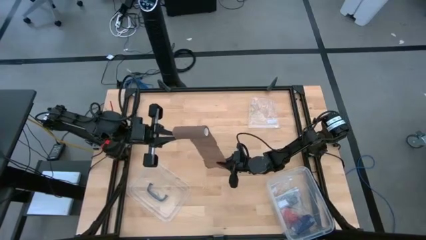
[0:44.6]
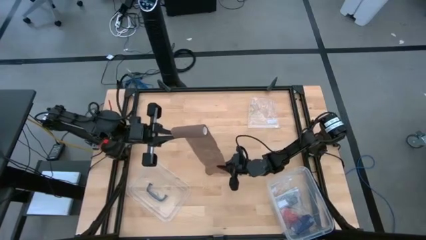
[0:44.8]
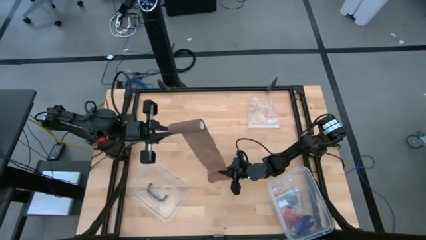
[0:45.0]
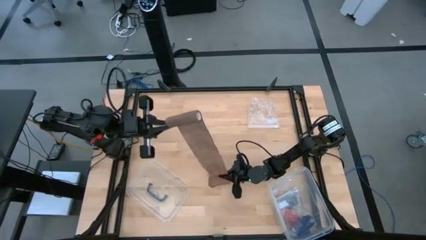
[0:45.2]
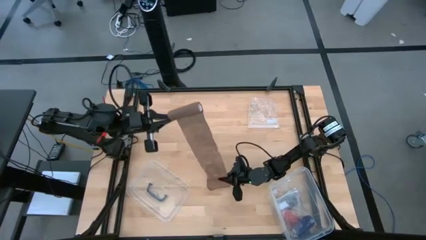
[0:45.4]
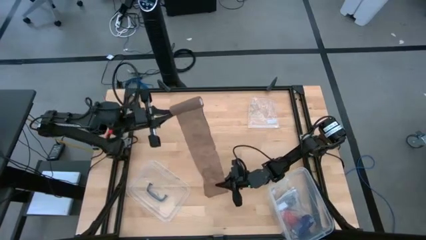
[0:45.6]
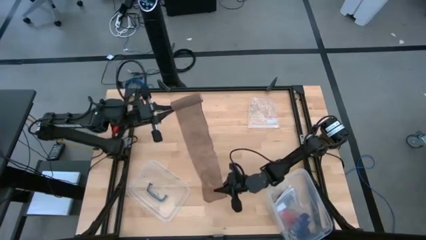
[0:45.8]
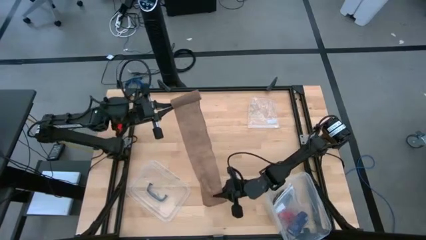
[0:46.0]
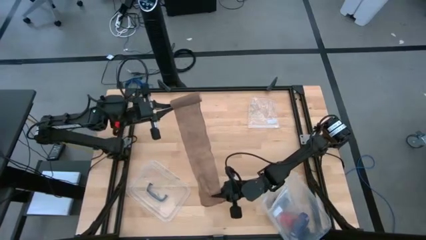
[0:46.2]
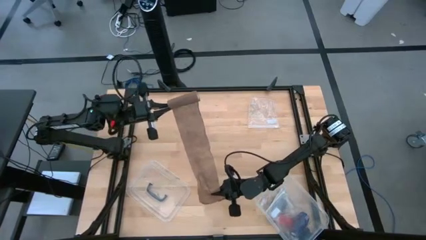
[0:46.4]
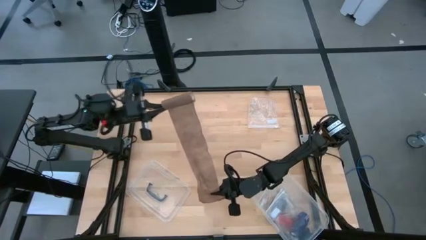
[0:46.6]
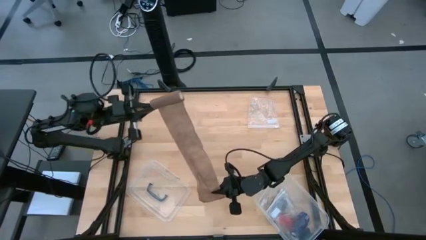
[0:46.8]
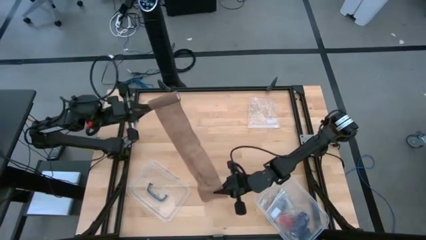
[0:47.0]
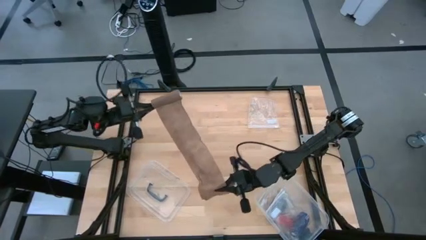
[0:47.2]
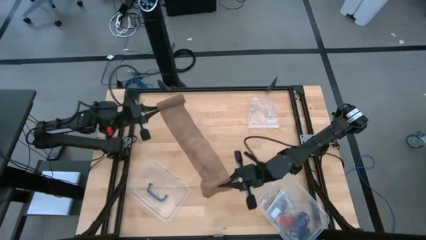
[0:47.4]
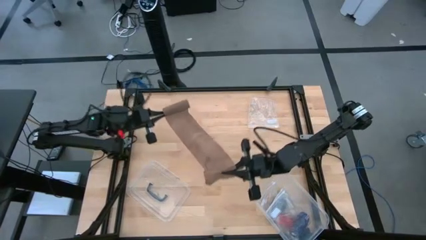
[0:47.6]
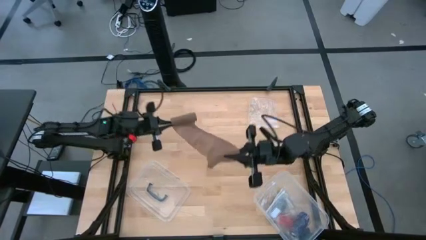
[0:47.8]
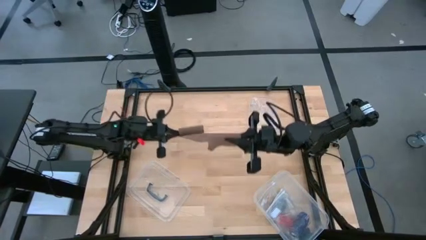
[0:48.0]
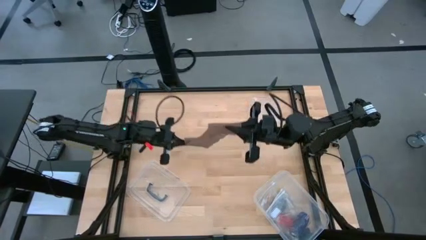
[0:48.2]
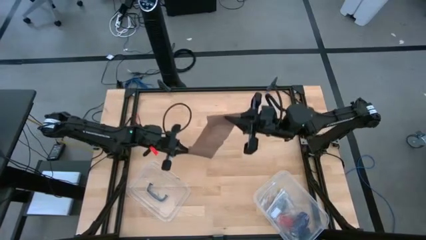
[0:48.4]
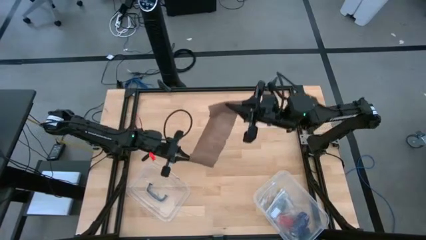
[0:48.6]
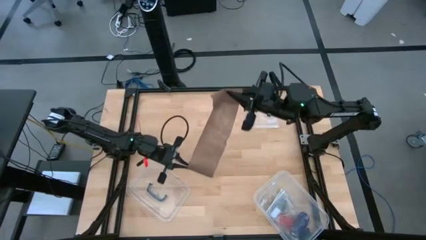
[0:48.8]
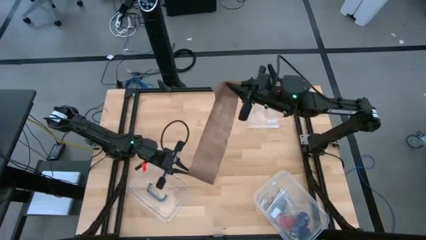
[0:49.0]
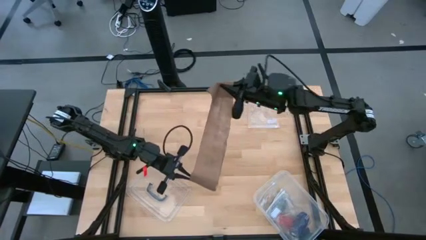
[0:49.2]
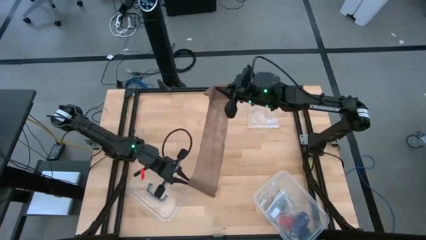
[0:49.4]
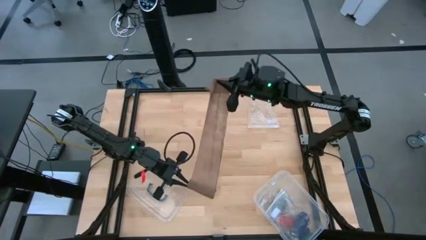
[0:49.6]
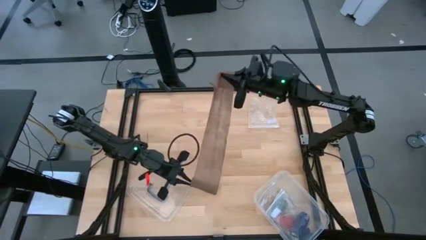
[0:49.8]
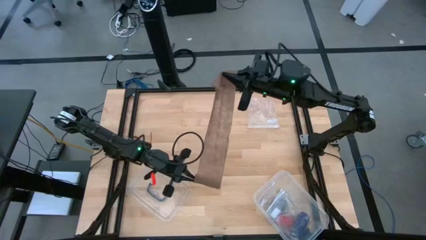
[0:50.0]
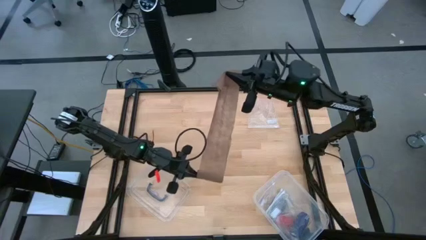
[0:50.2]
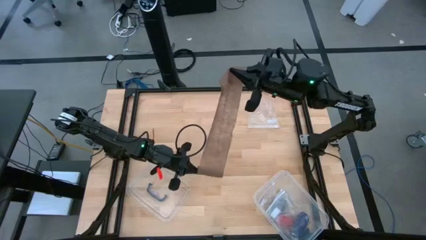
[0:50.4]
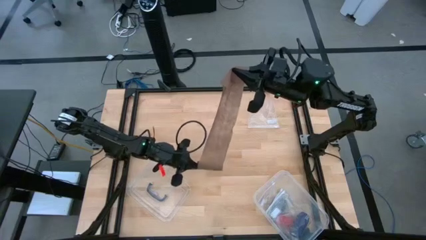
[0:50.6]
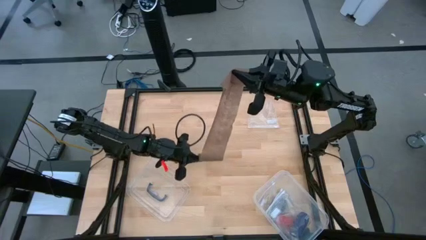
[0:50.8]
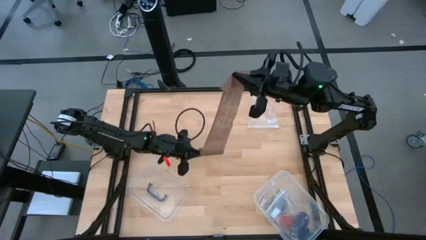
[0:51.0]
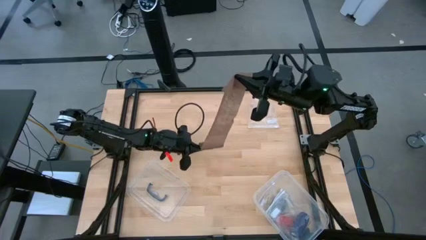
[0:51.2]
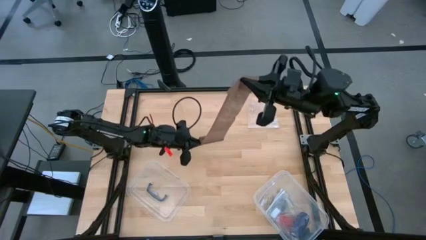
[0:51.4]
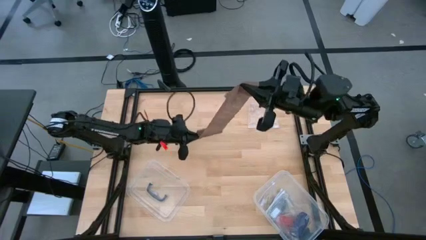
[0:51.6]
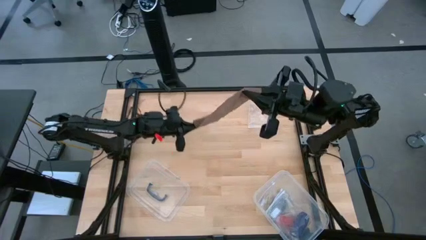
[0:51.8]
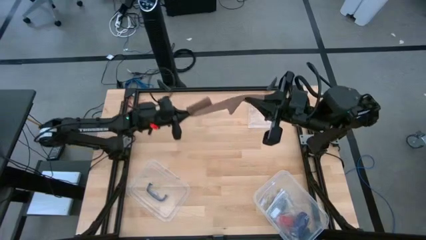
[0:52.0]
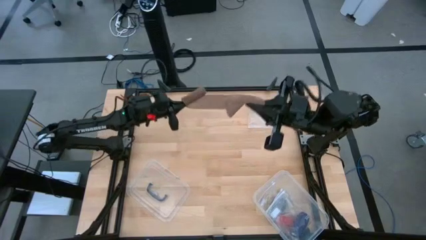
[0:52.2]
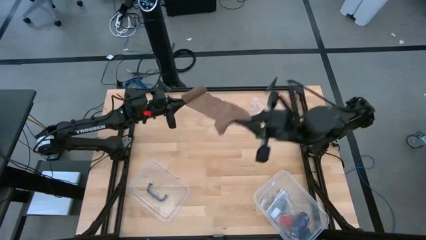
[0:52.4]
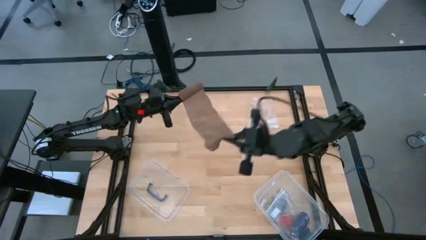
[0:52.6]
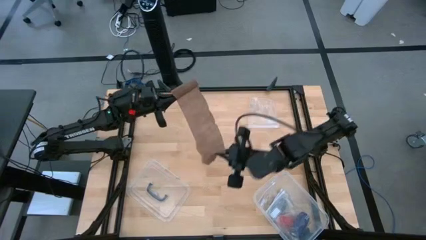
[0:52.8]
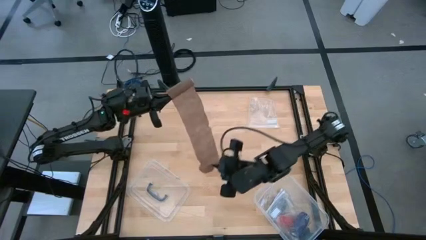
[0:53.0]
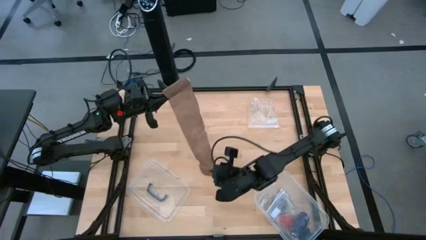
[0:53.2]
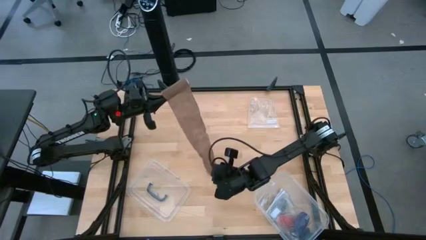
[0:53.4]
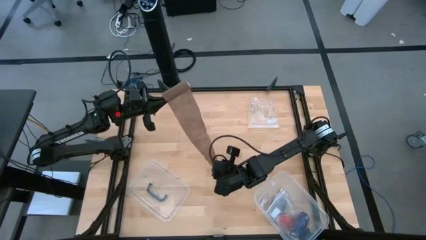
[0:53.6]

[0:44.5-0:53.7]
Task: Roll bandage
Roll the brown bandage

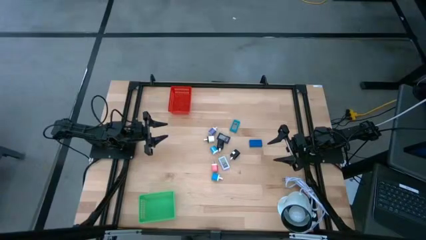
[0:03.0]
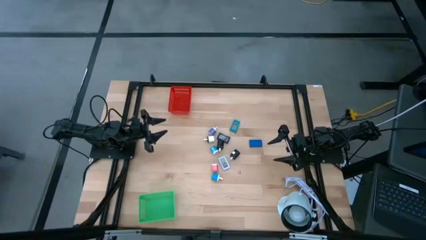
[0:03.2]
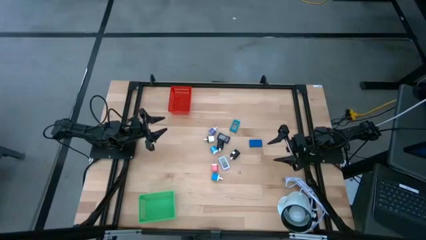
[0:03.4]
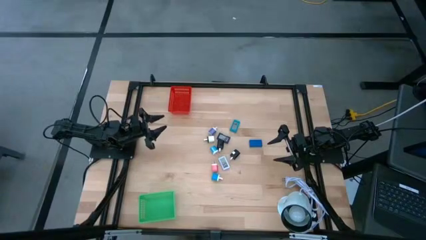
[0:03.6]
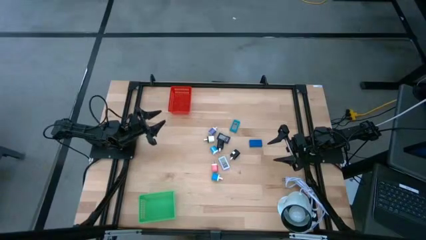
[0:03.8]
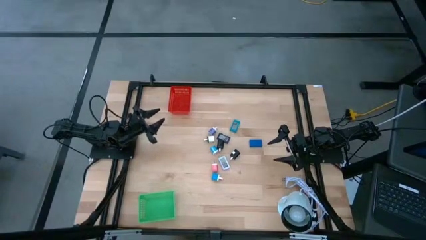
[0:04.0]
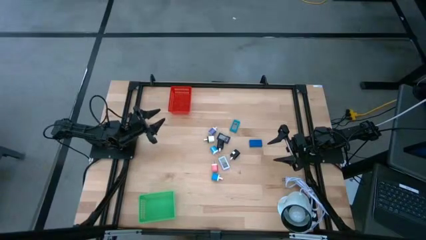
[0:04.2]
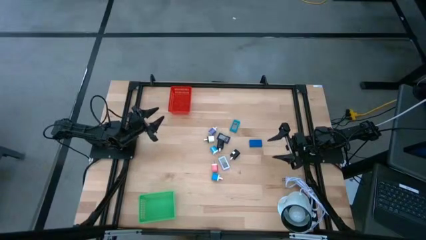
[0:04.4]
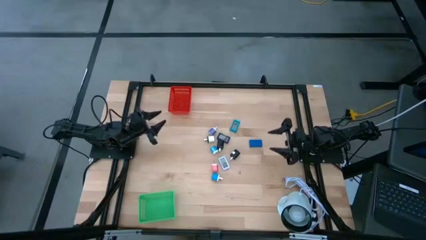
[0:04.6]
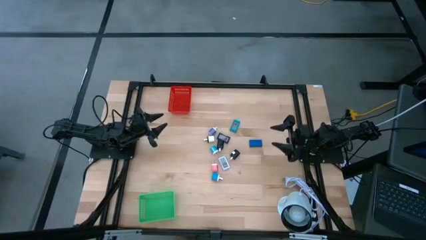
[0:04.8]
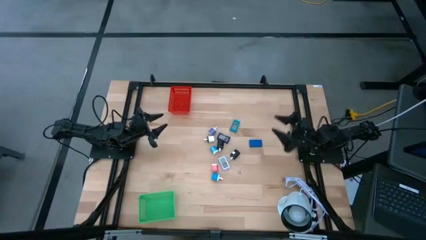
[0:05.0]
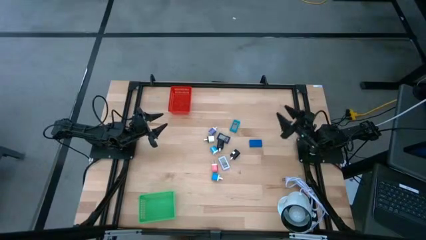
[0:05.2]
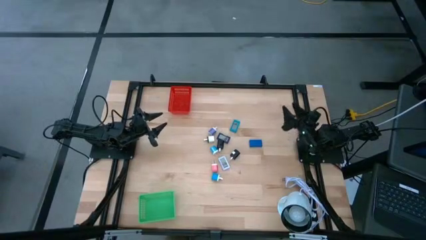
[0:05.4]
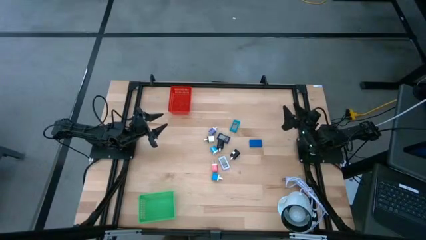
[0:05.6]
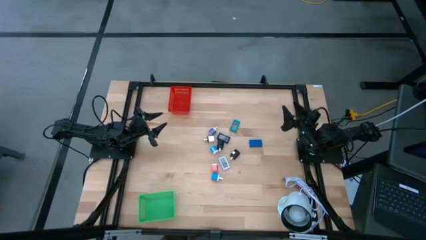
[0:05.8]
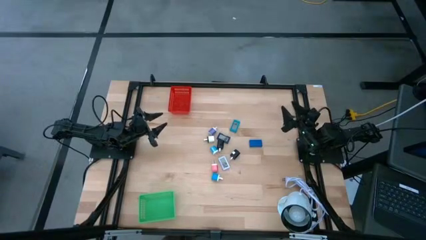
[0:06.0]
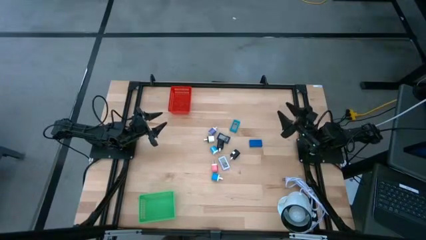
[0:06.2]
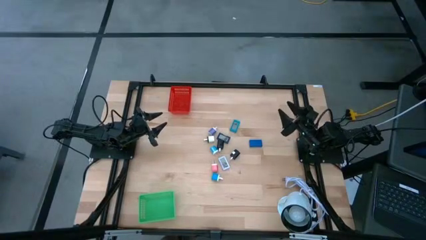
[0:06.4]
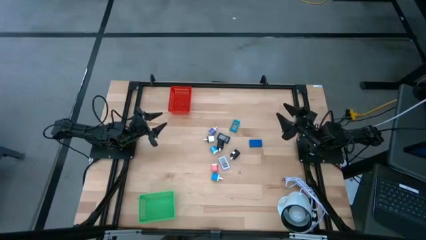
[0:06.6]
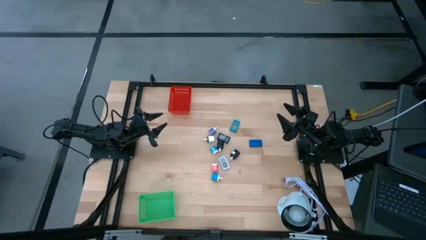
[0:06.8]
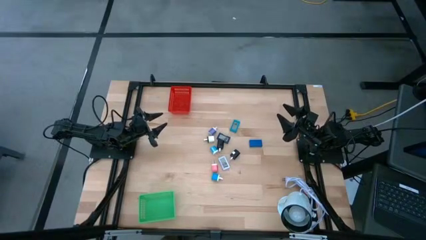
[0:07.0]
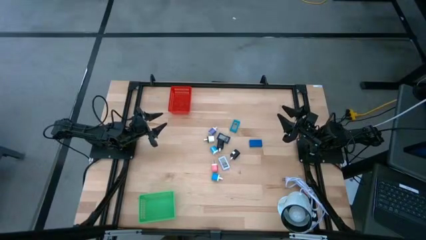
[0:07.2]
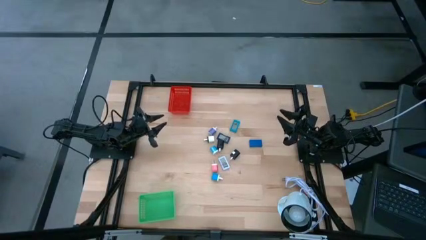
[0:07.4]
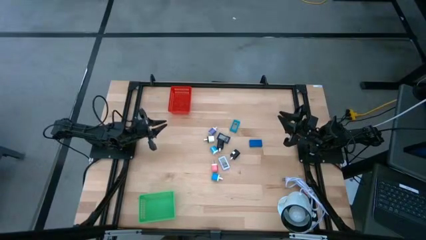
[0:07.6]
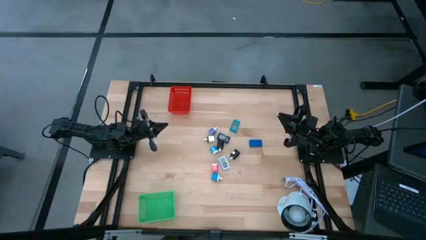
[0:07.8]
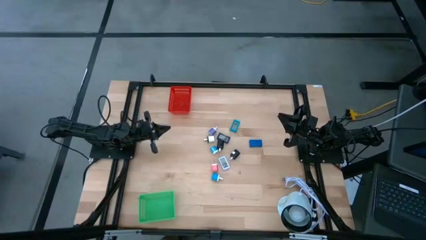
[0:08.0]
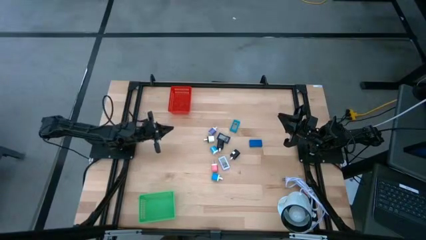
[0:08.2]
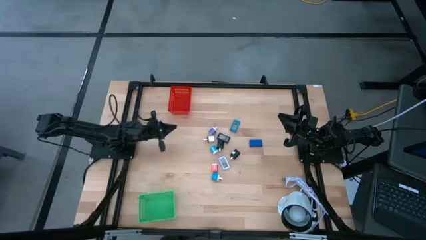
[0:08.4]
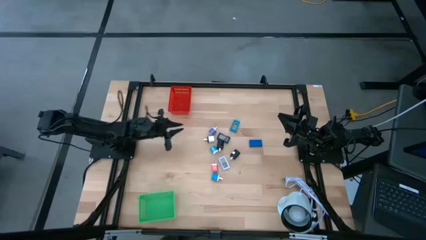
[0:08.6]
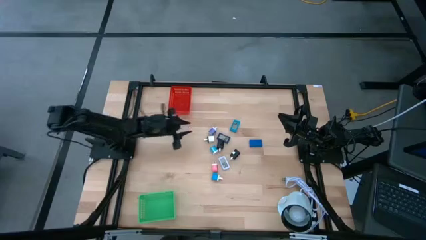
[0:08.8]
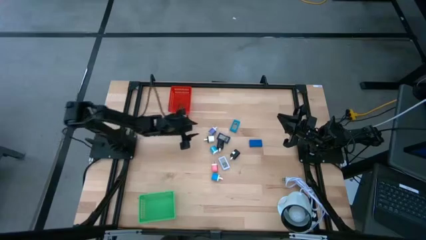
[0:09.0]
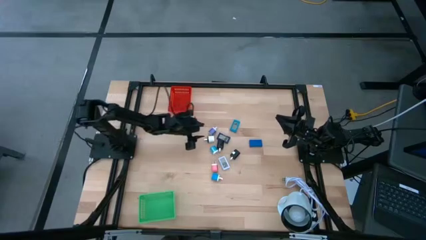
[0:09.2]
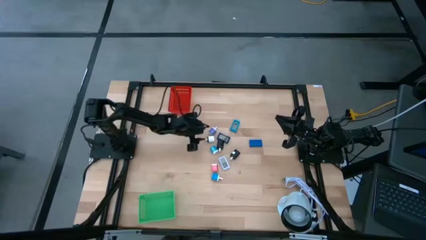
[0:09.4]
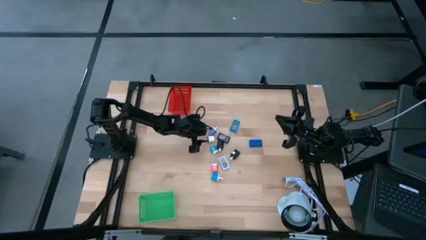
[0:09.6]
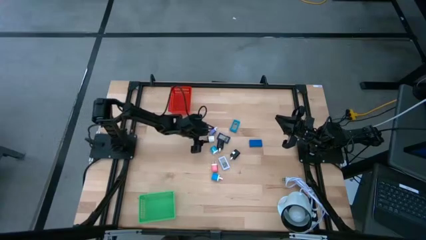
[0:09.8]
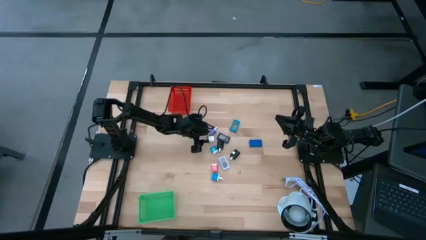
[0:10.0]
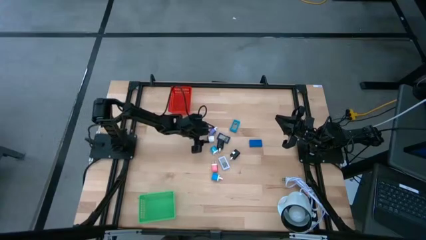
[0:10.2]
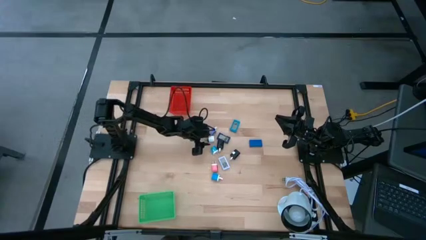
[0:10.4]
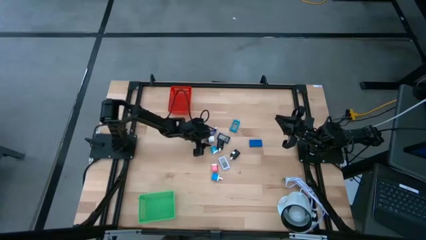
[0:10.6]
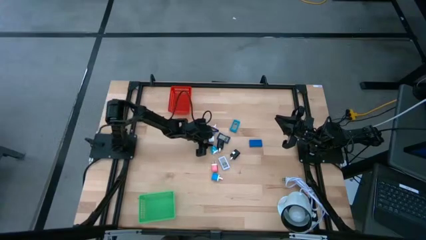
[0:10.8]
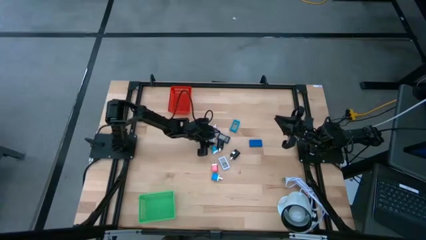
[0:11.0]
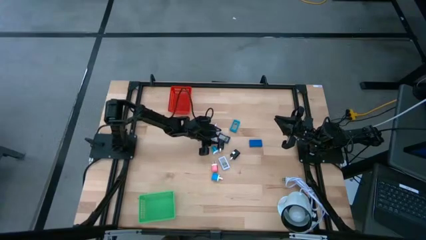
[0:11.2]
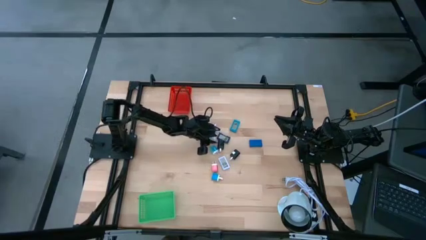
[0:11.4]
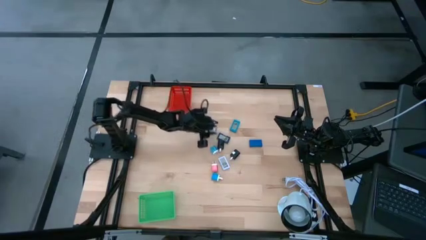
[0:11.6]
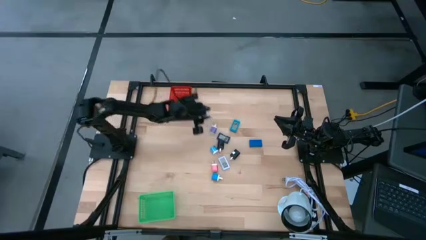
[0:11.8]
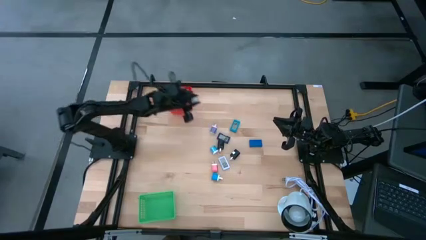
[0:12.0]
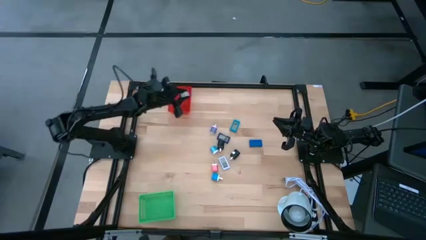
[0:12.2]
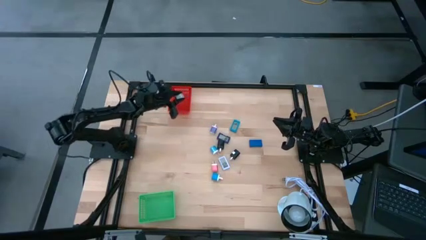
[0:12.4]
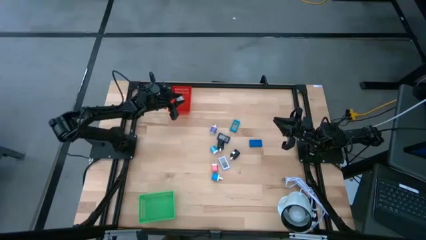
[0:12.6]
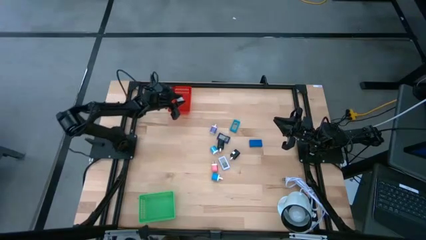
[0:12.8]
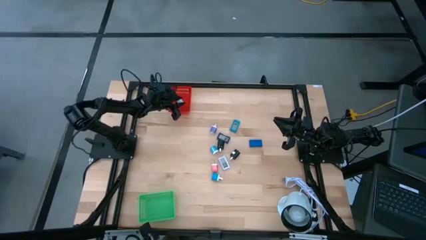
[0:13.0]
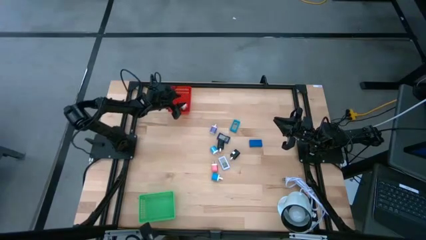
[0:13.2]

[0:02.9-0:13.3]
Task: Pick & Place Office items
Put the white charger adapter into the red bin
